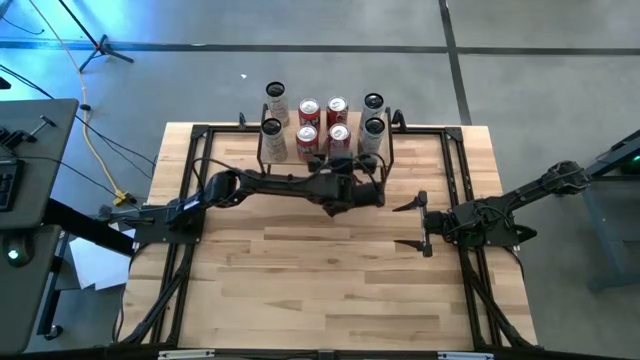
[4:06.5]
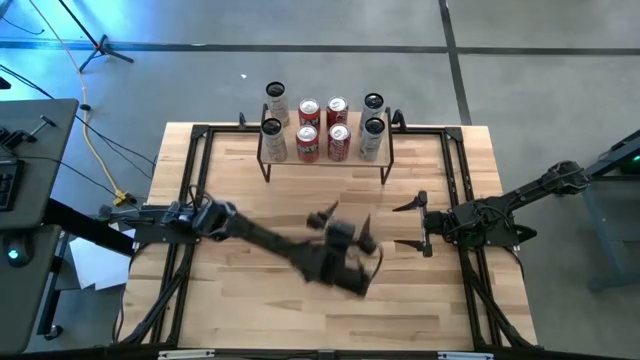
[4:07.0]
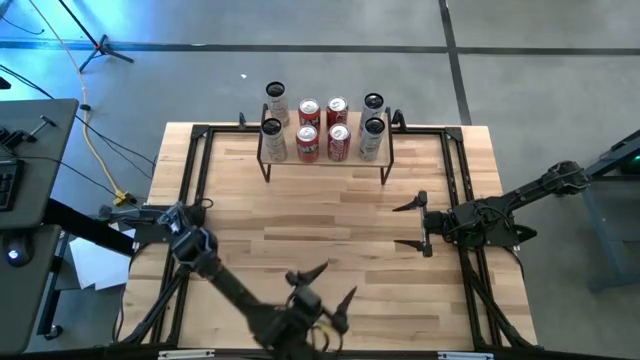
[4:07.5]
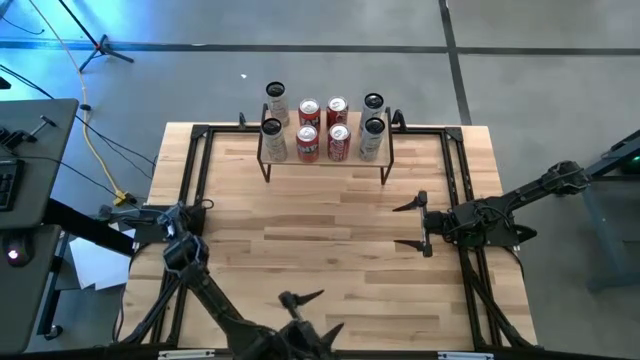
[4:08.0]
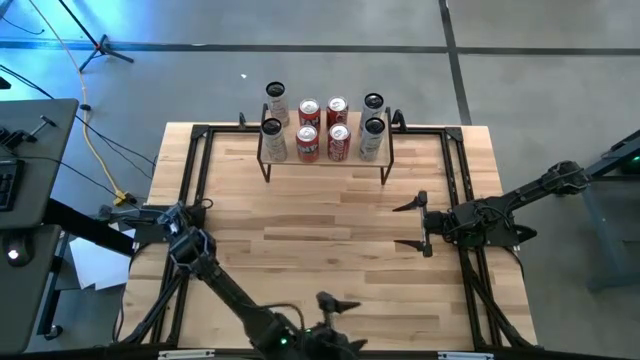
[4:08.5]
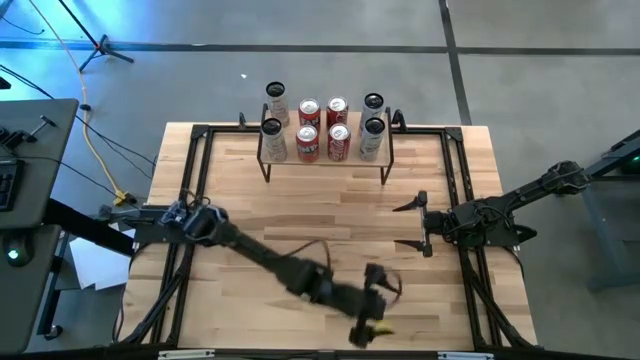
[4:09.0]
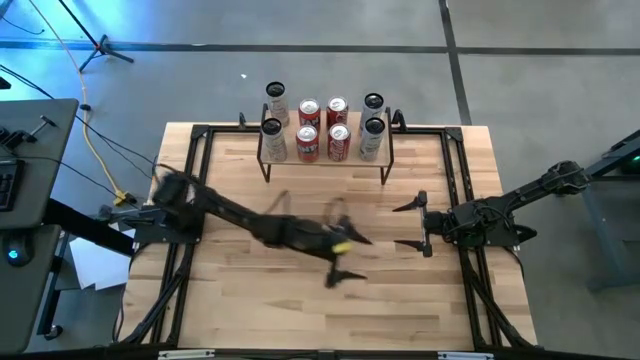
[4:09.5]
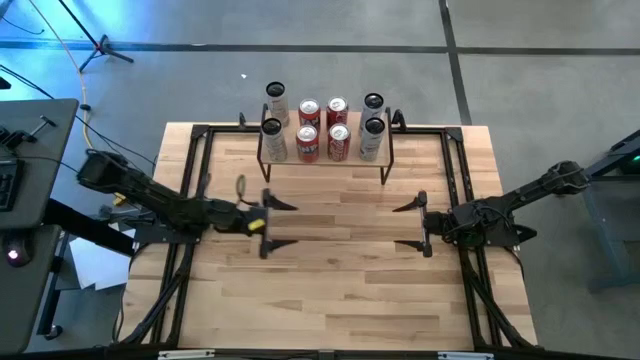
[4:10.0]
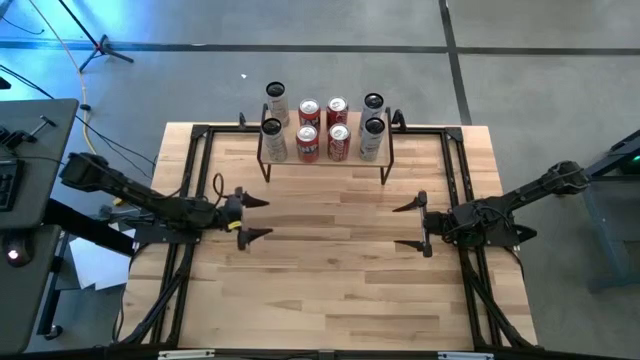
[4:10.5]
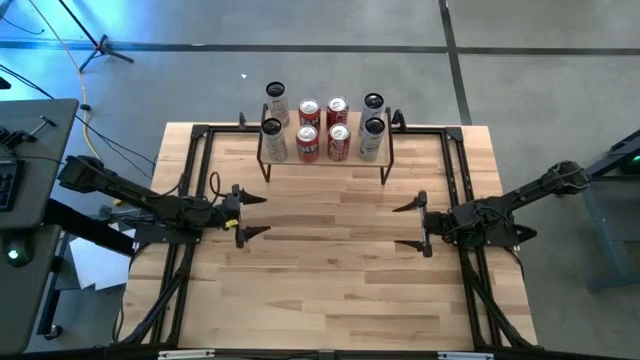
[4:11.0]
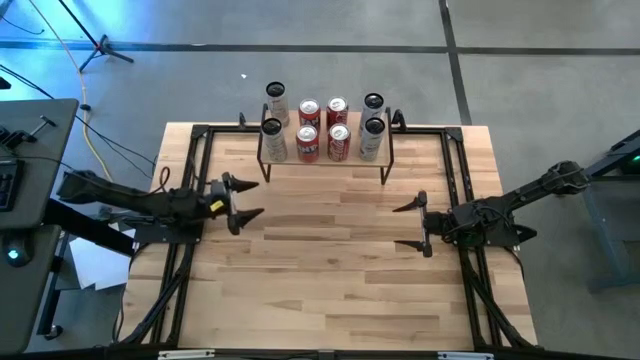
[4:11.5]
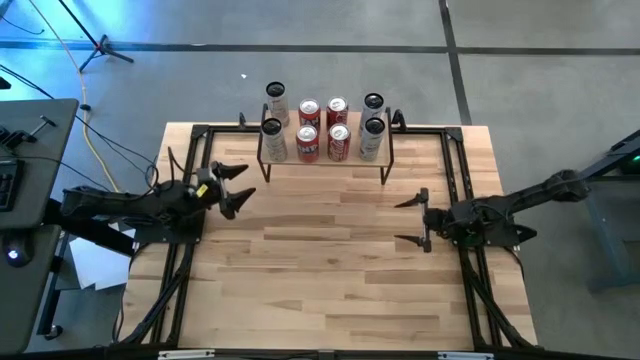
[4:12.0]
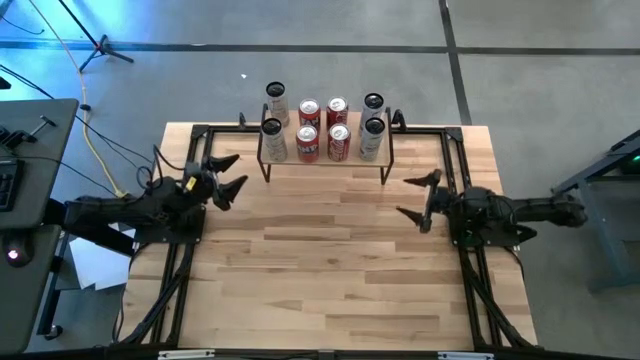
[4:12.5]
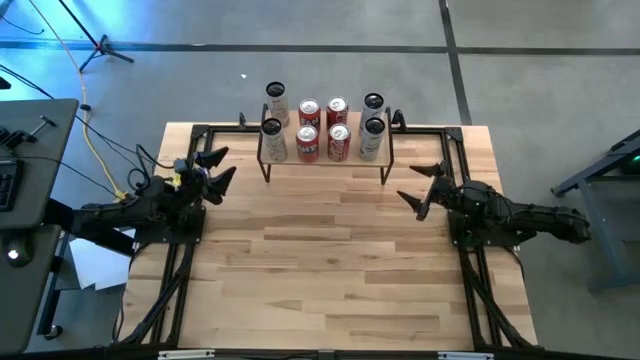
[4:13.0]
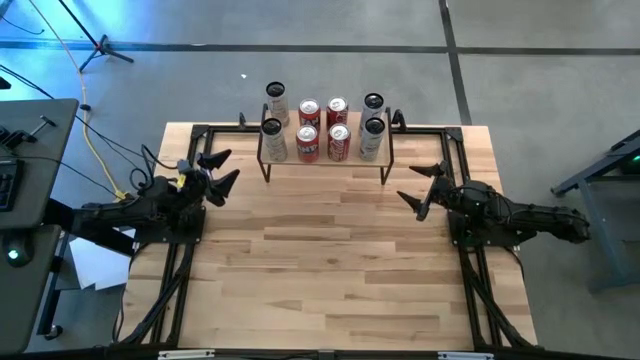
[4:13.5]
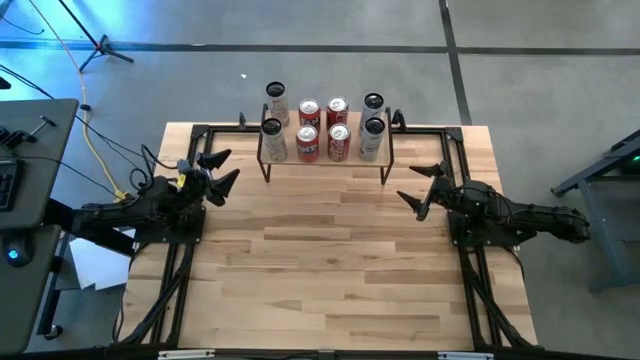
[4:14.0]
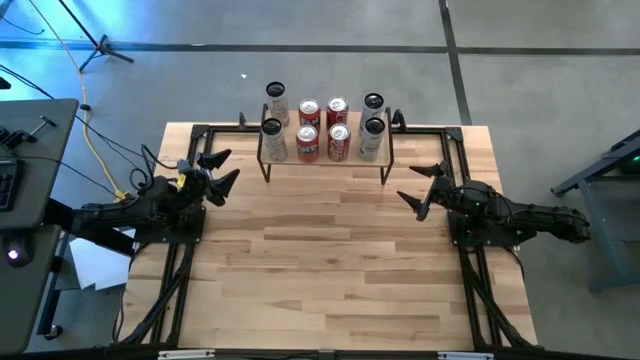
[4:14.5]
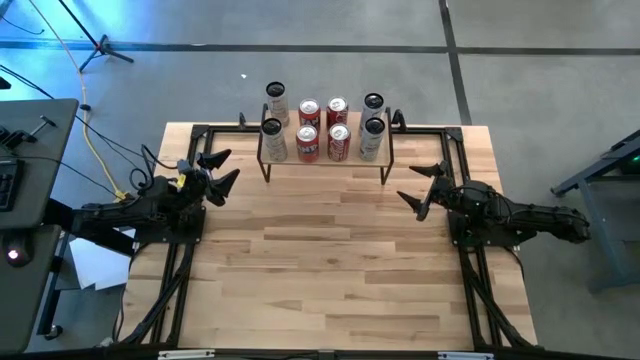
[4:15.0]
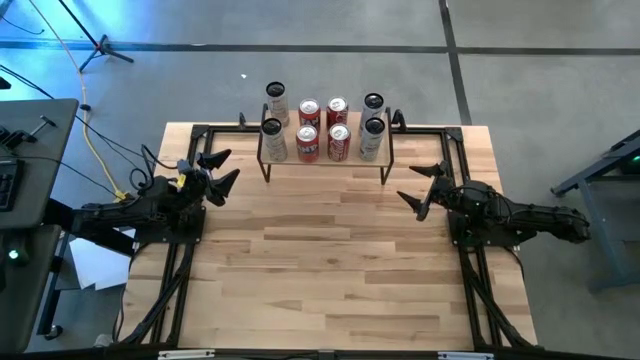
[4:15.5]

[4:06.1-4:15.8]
Task: Place canned beverage on shelf
Return to Home Position

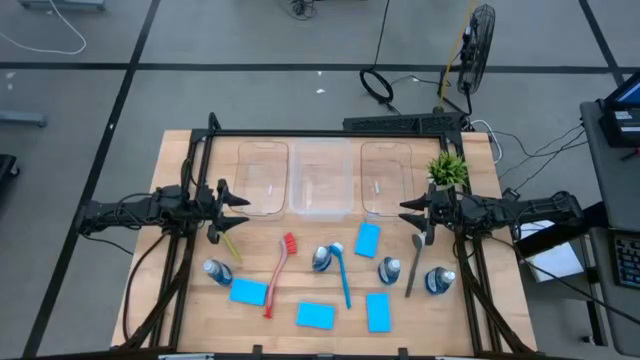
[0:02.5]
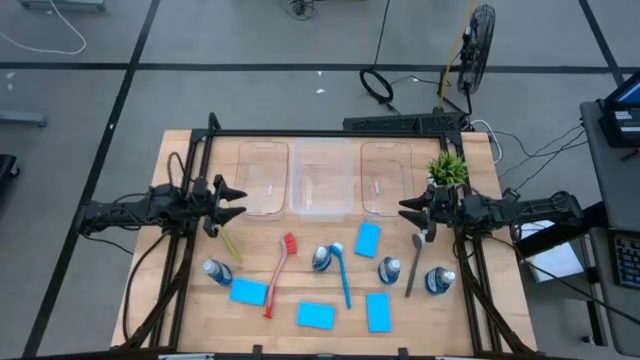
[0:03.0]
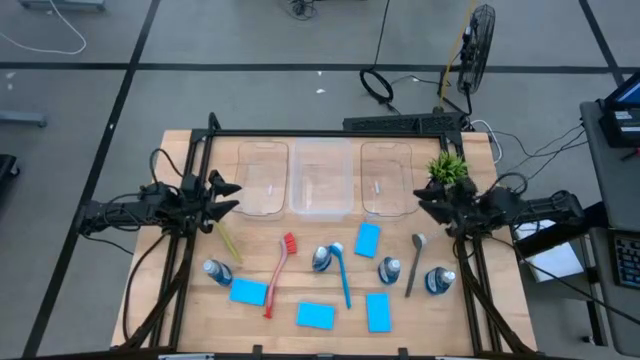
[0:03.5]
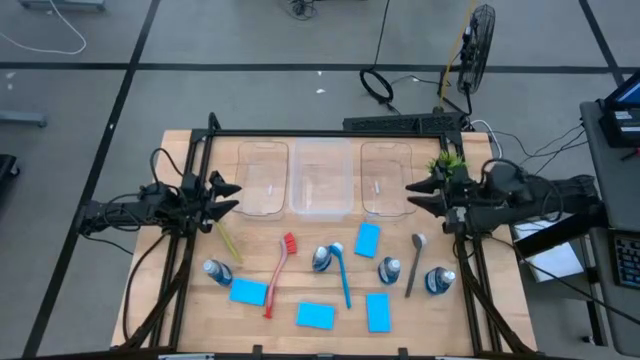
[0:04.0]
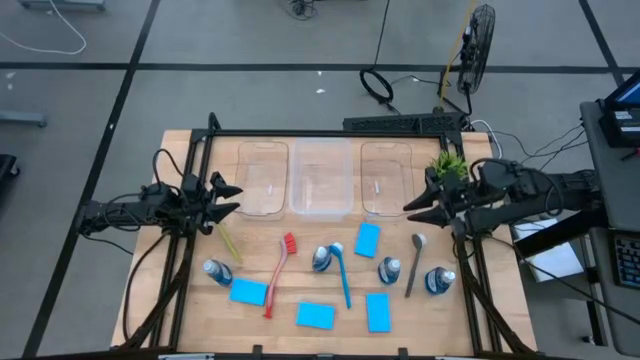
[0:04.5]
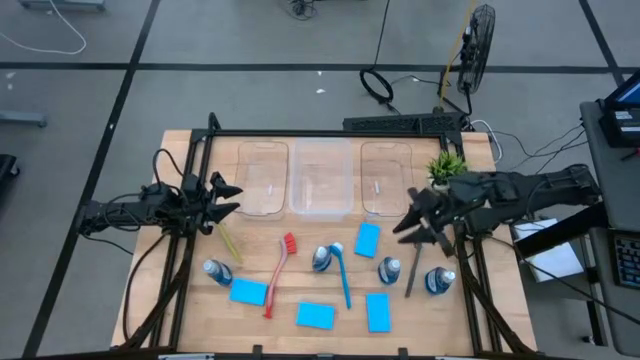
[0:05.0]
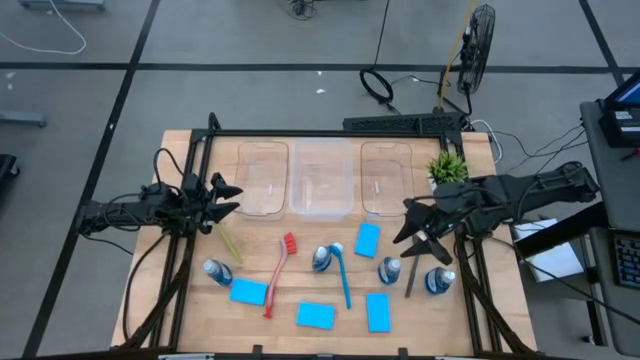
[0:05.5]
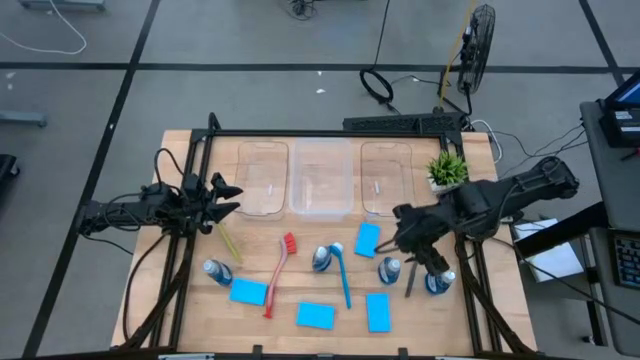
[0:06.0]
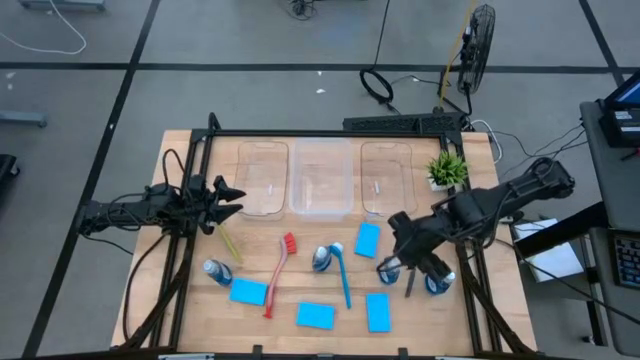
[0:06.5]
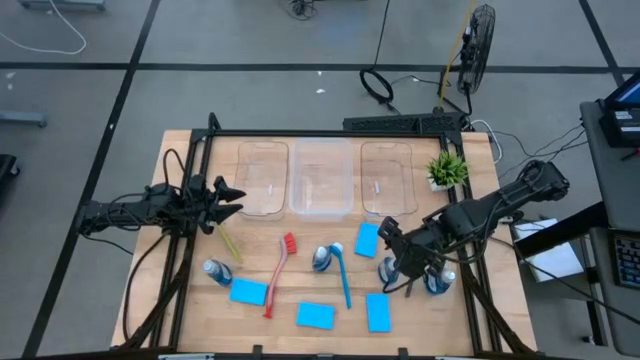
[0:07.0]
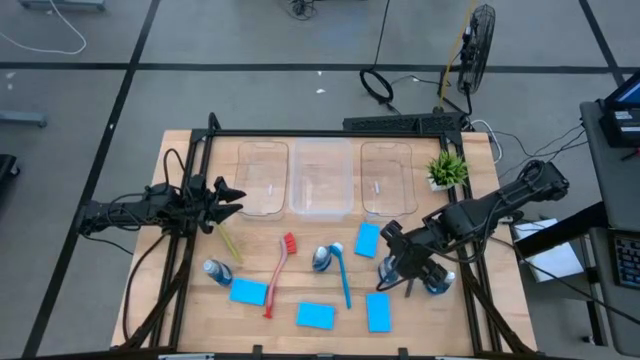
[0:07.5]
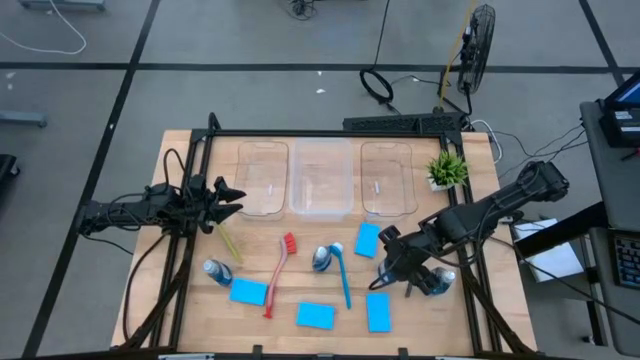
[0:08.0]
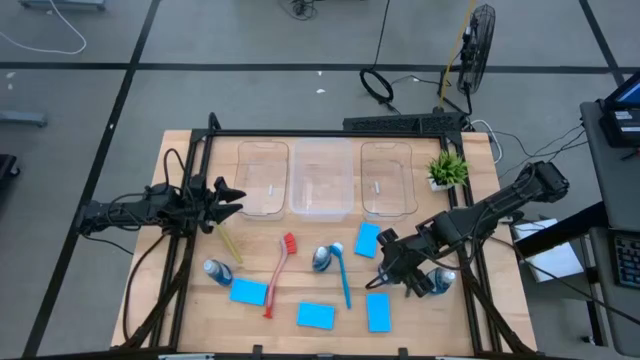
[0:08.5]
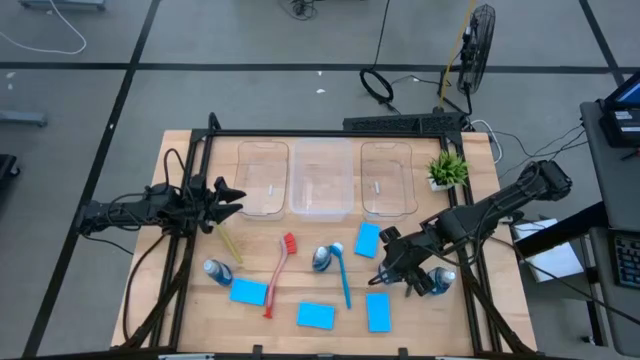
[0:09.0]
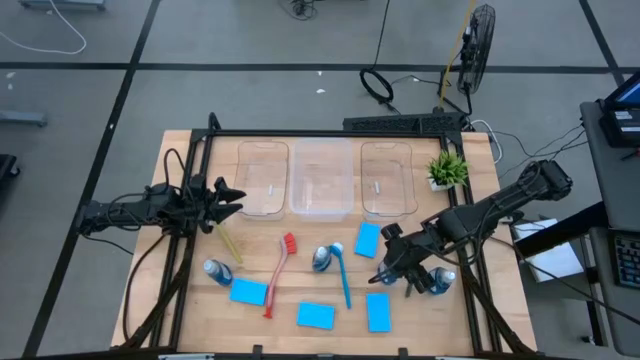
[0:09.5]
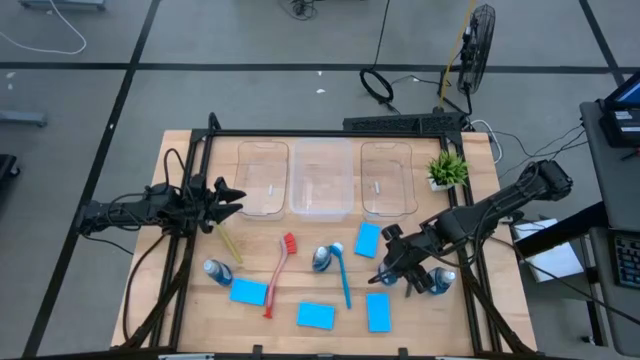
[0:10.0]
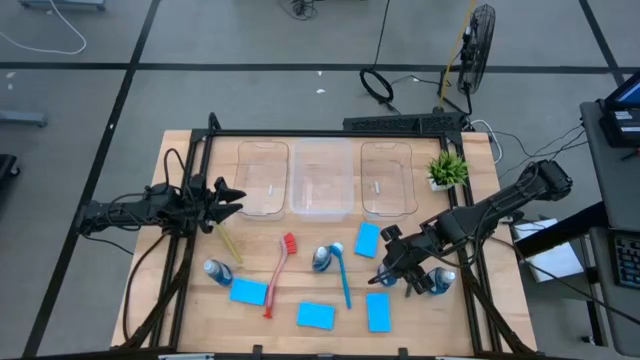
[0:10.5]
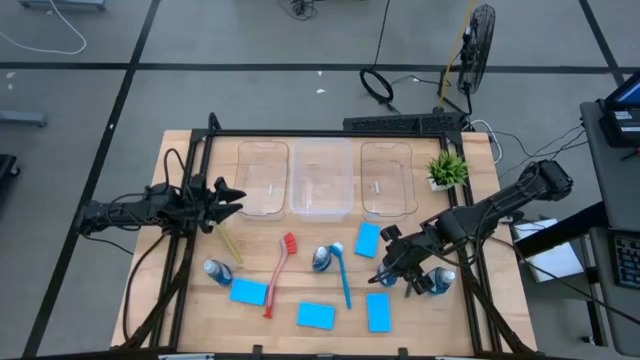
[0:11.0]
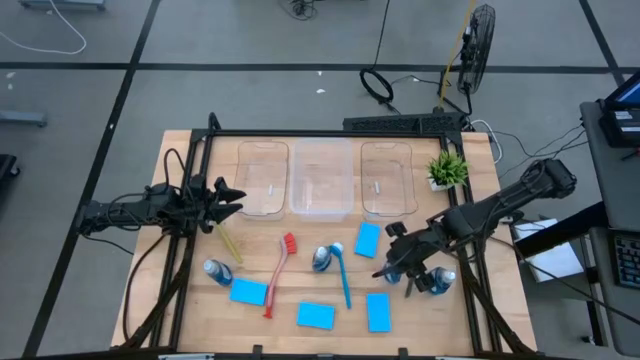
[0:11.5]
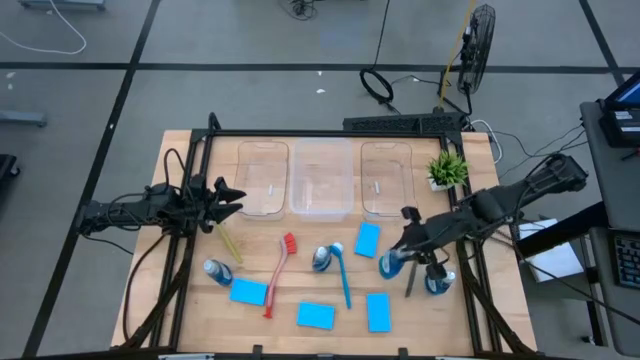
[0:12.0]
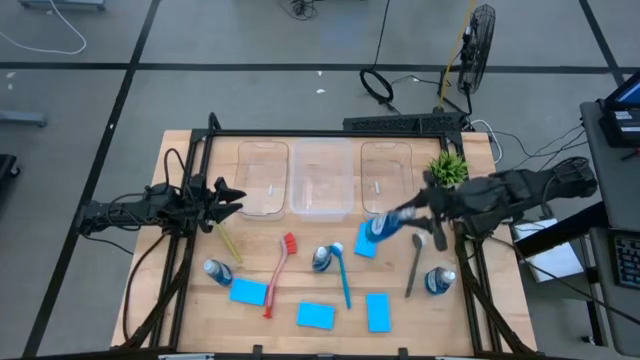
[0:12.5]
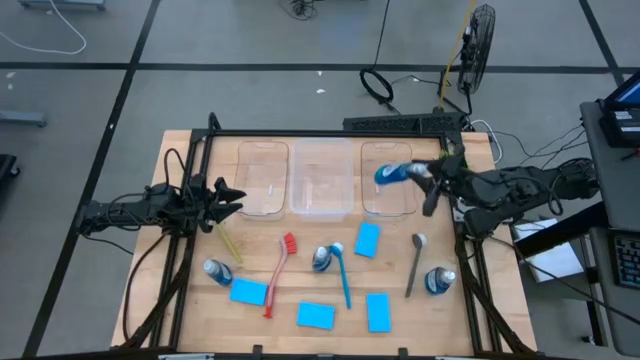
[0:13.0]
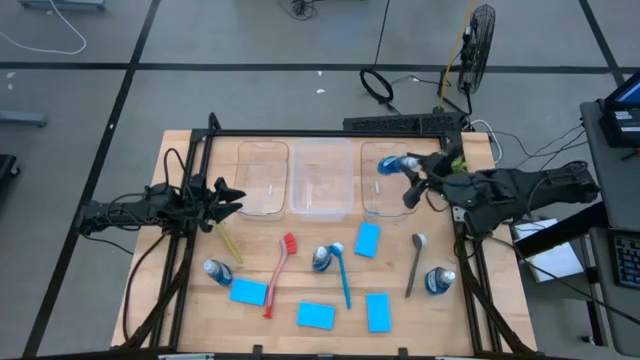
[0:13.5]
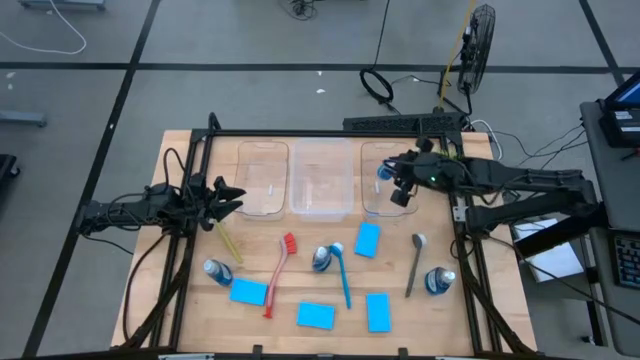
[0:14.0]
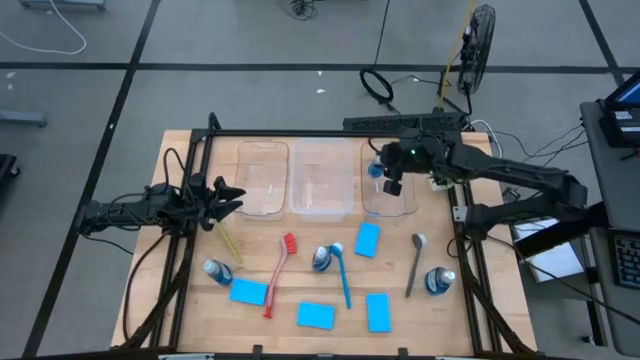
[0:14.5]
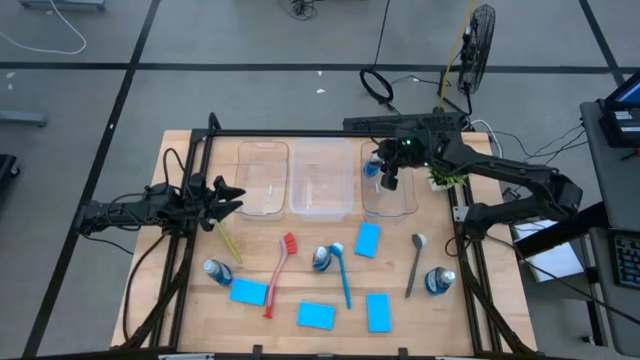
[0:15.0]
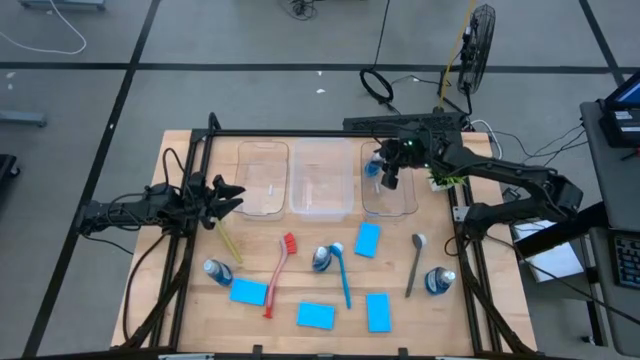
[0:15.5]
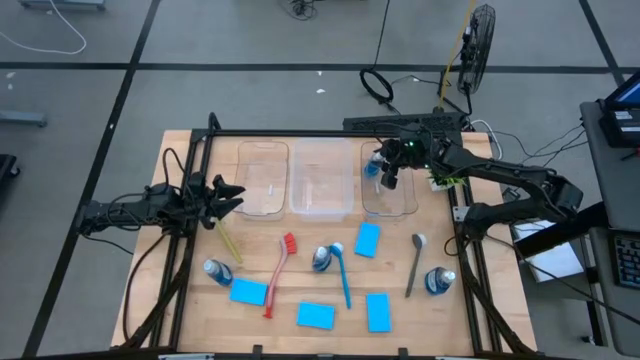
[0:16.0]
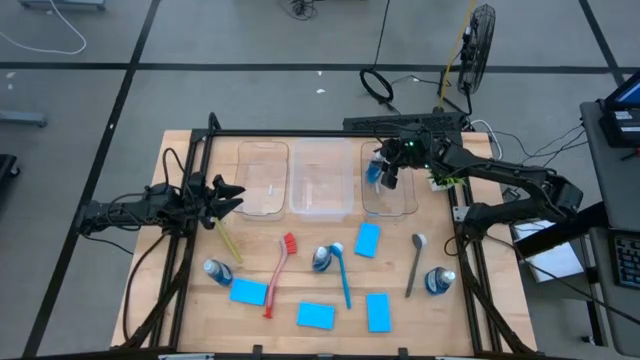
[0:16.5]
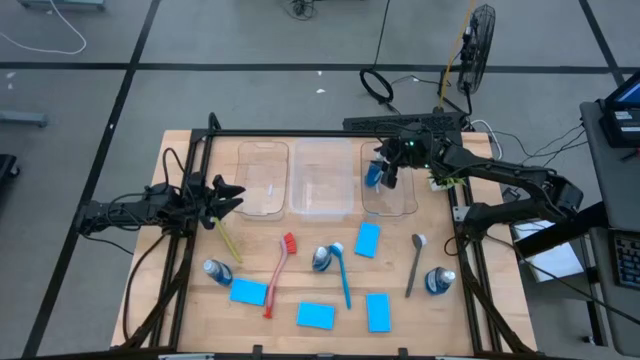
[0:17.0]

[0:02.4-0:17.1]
Task: Pick & Place Kitchen Sink Supplies
Put the blue dishwashing liquid bottle into the right transparent bin
